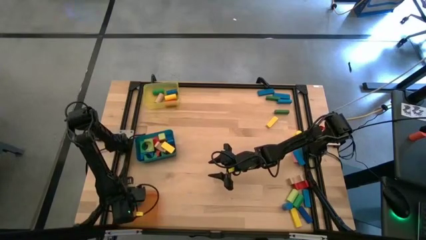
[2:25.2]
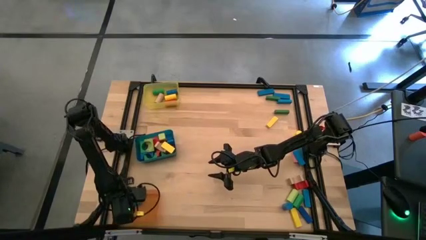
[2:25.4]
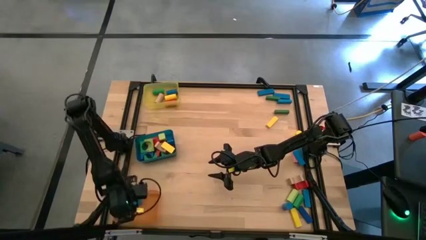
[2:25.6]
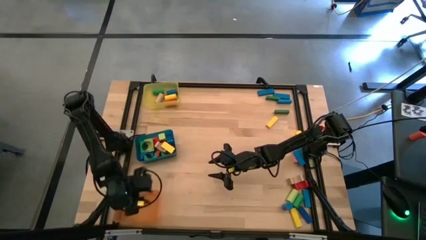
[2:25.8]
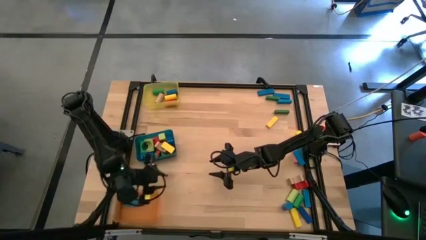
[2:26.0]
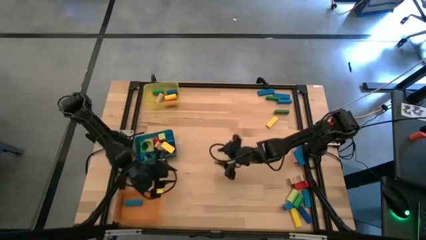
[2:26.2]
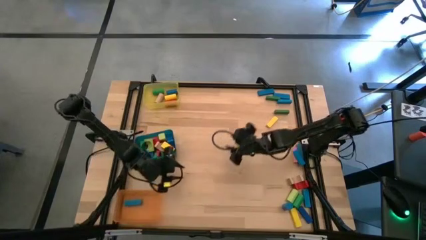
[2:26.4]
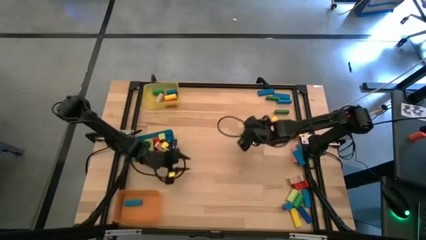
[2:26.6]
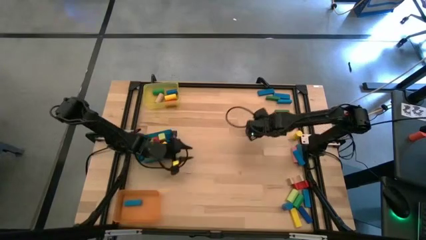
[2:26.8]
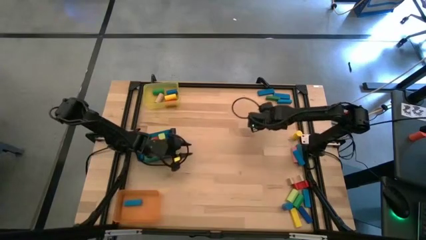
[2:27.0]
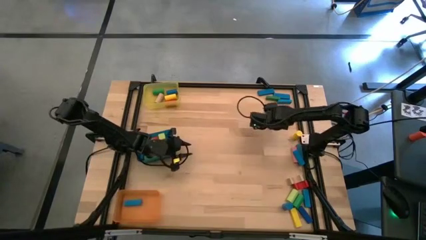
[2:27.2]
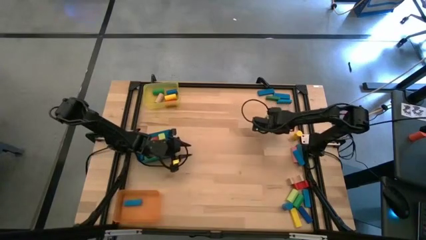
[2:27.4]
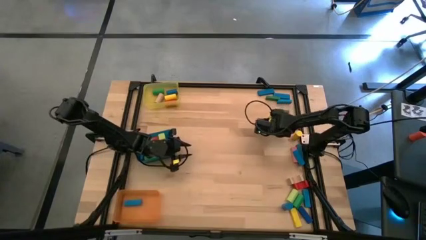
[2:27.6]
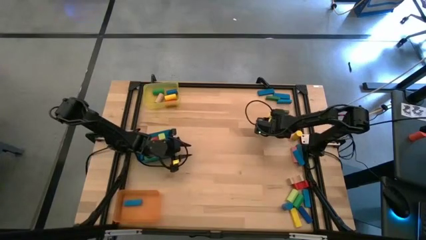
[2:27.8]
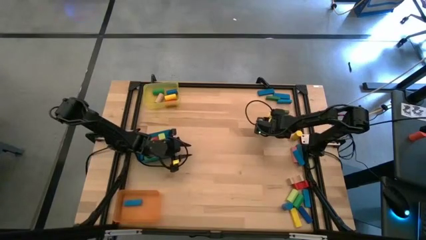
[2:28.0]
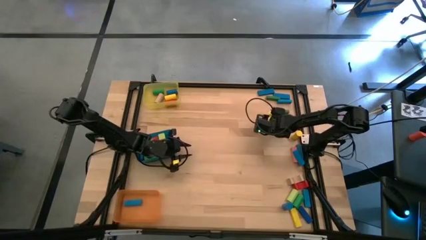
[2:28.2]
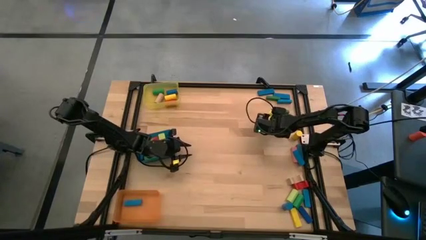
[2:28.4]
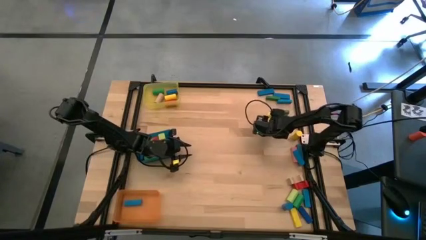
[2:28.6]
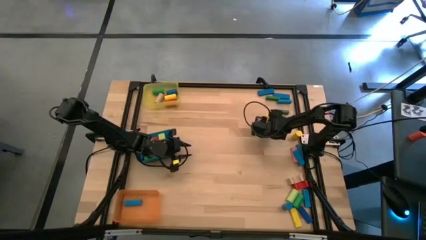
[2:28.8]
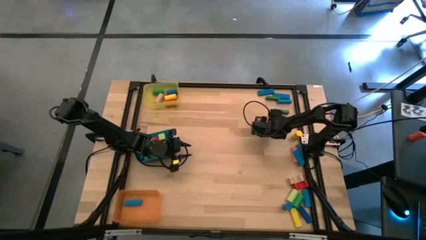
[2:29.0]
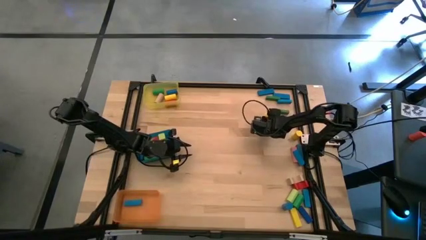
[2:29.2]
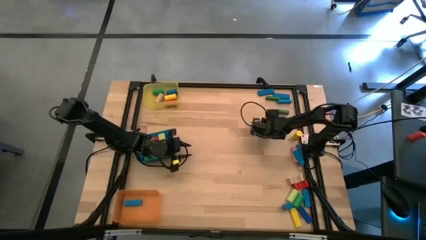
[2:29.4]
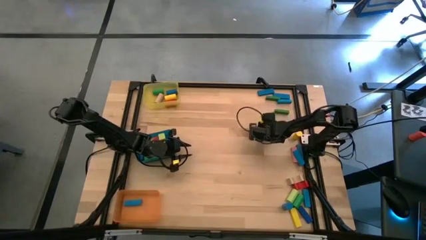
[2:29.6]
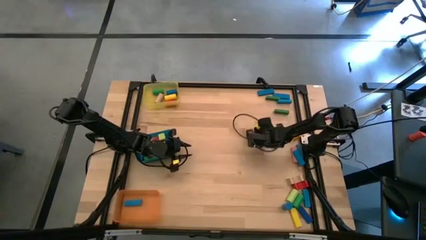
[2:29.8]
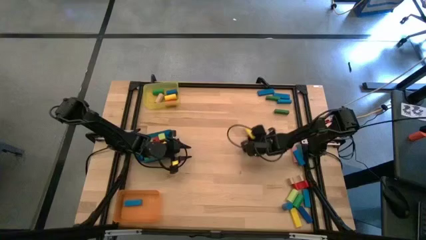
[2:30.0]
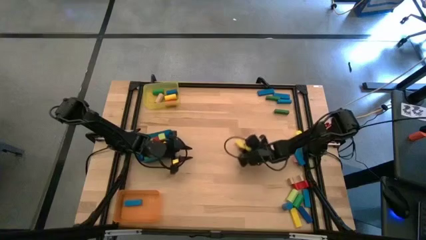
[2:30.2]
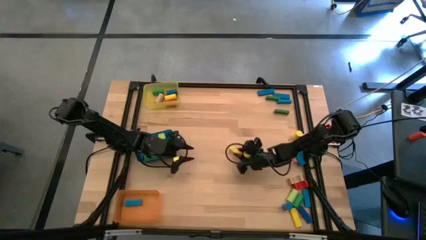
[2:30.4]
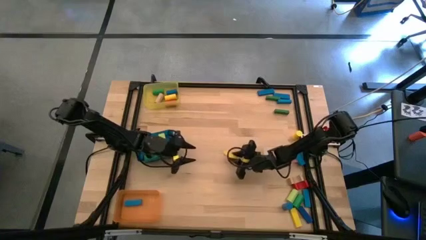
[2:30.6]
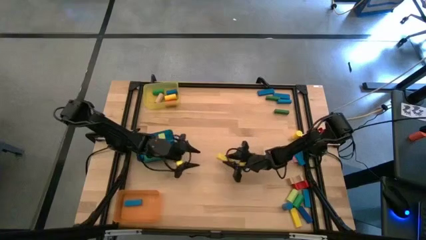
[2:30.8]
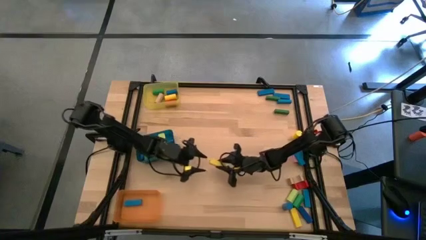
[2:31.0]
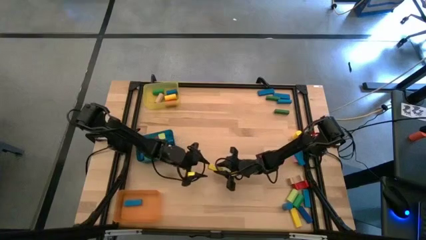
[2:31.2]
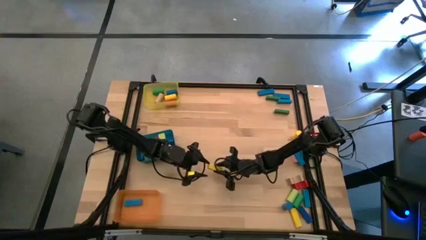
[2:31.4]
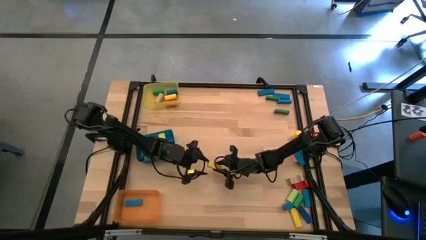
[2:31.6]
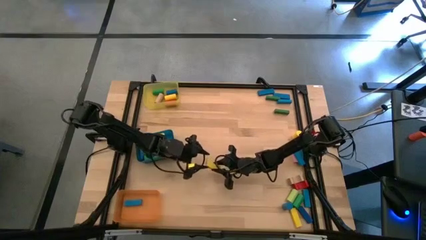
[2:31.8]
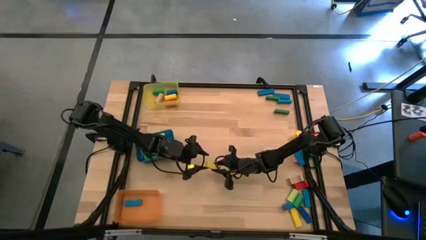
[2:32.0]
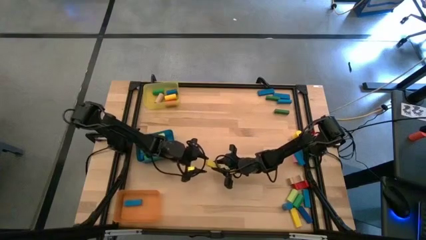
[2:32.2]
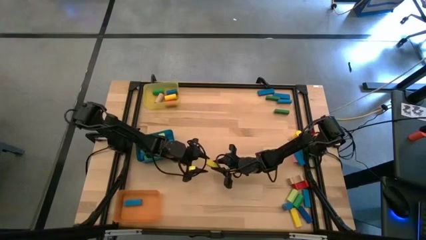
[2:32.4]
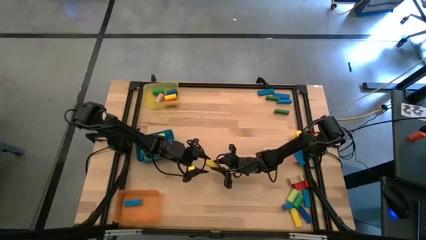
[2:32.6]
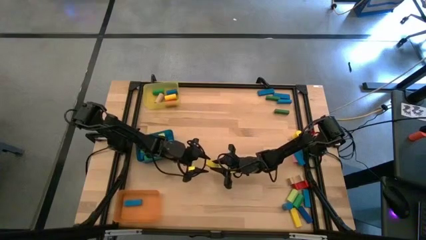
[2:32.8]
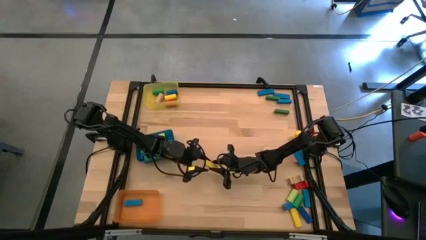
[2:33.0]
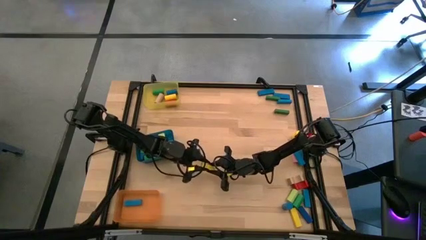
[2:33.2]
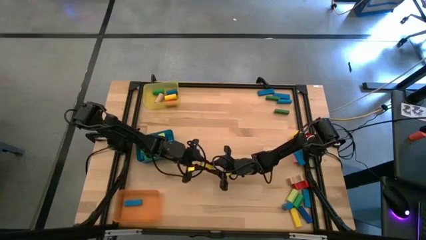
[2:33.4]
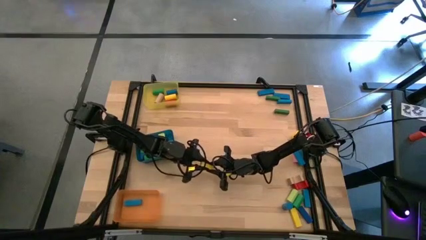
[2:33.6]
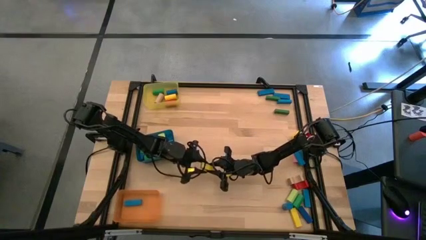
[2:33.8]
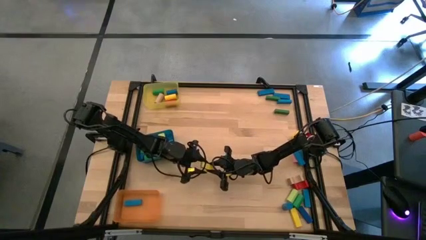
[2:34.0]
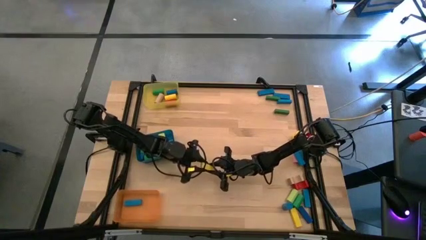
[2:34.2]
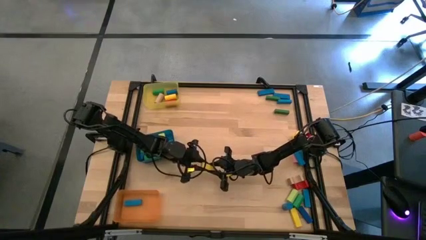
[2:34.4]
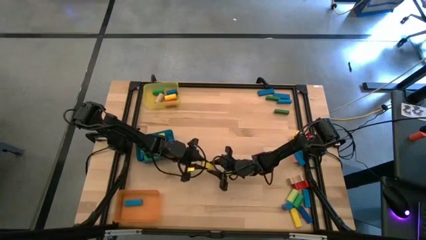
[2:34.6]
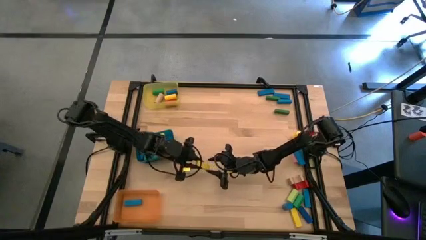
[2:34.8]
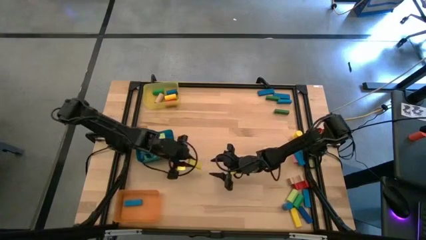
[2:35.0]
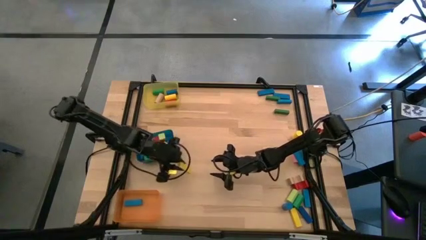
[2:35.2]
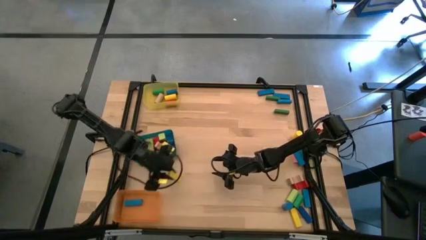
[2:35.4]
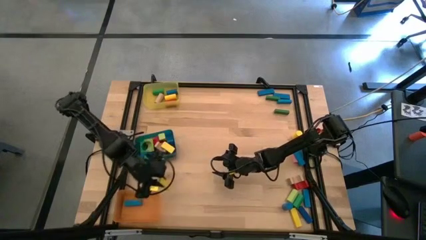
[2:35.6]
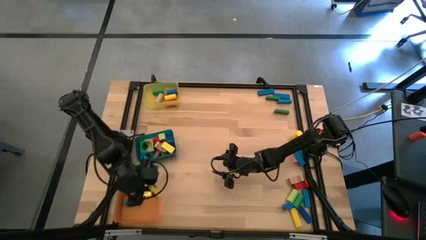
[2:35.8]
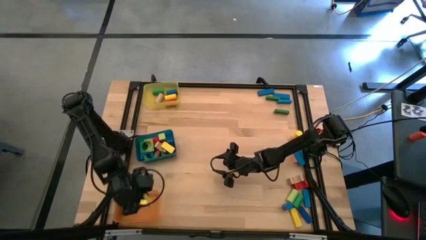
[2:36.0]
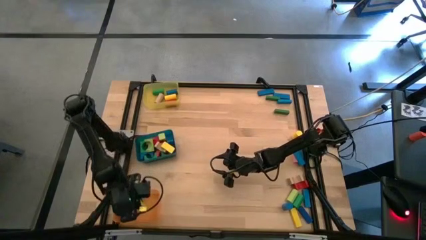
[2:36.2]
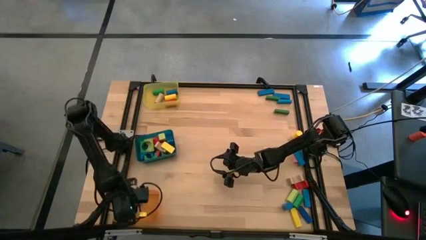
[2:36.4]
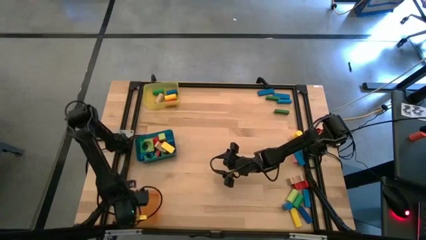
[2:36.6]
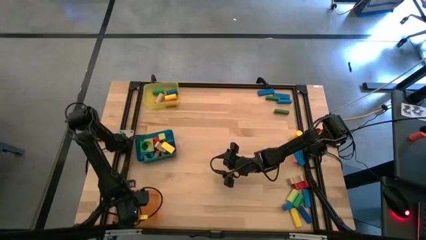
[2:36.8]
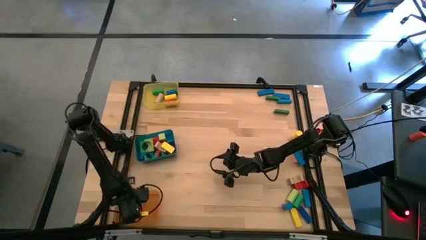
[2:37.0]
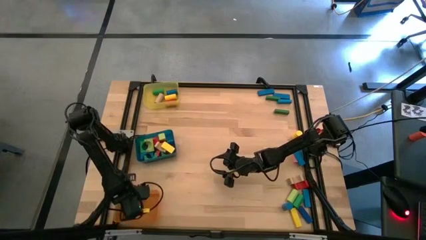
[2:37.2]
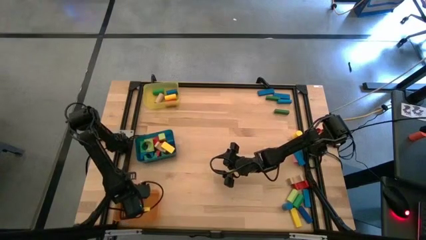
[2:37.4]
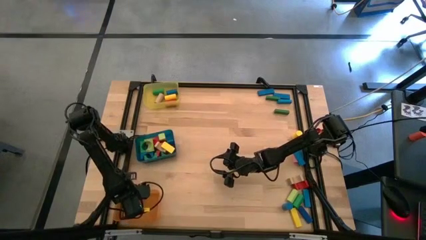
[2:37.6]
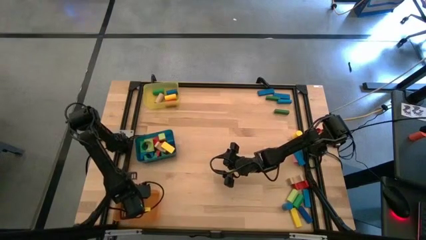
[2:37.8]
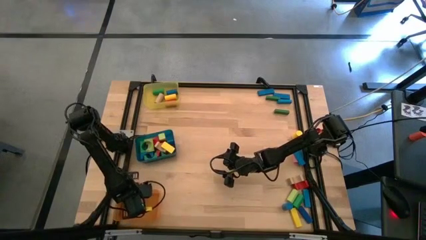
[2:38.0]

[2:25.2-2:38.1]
Task: Sort blocks by size
Put the yellow block into the orange bin

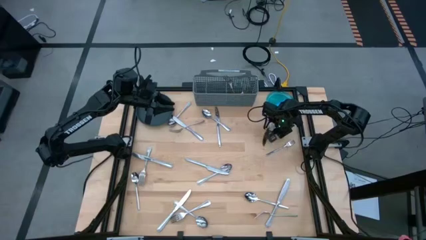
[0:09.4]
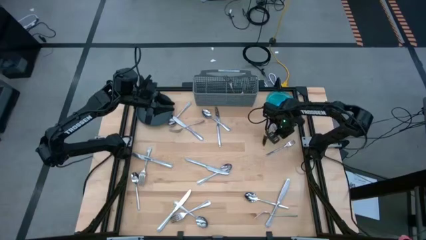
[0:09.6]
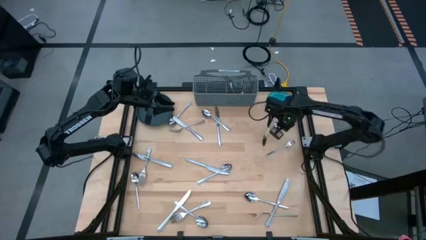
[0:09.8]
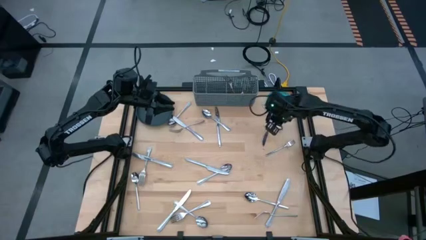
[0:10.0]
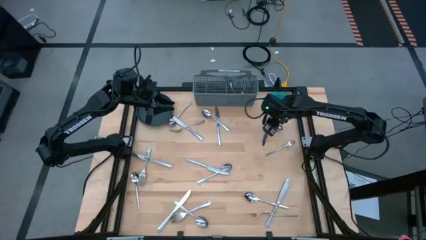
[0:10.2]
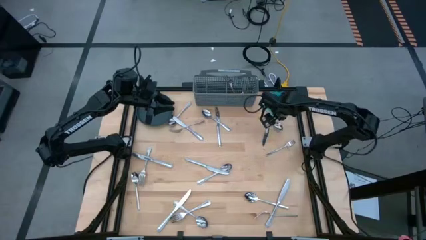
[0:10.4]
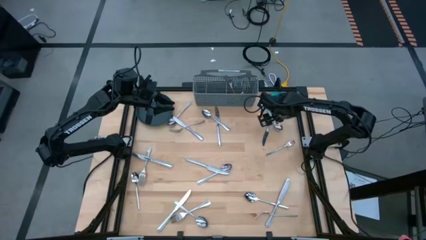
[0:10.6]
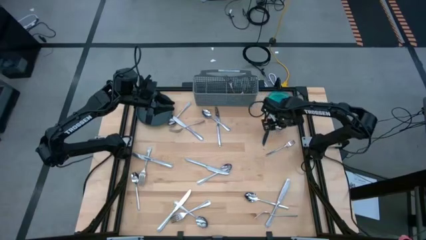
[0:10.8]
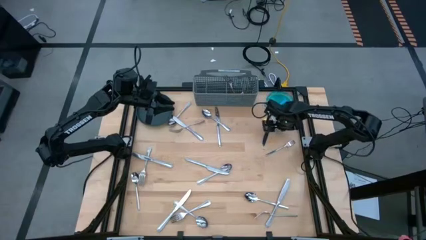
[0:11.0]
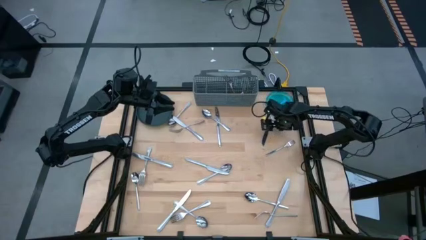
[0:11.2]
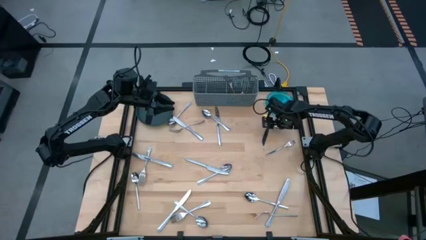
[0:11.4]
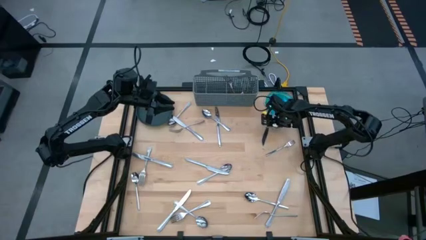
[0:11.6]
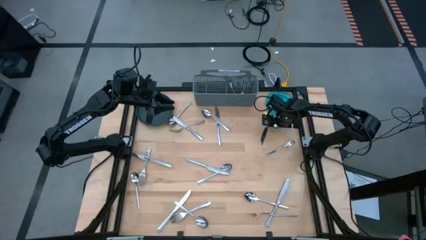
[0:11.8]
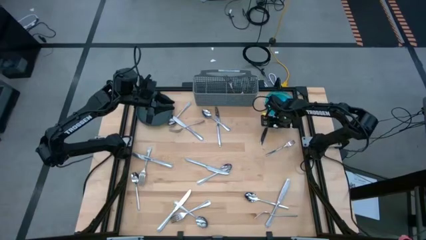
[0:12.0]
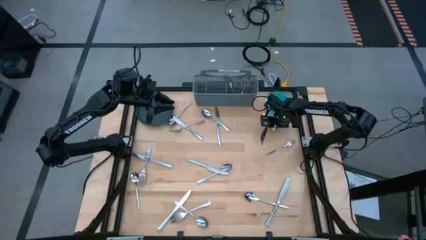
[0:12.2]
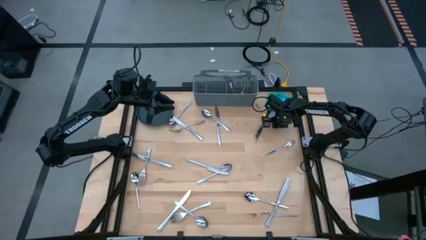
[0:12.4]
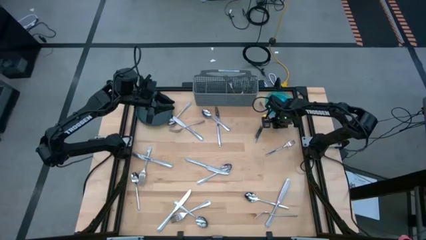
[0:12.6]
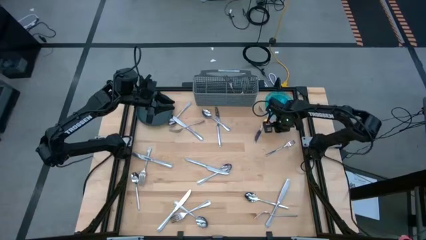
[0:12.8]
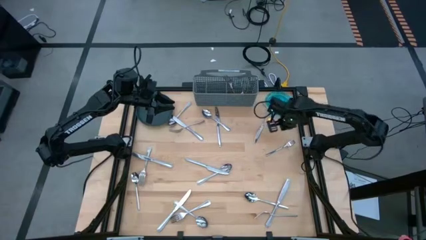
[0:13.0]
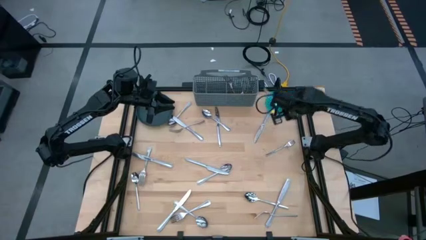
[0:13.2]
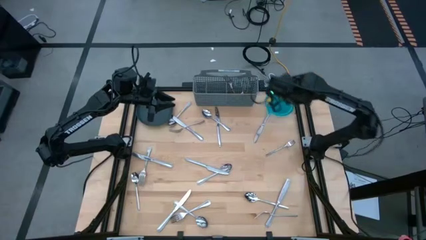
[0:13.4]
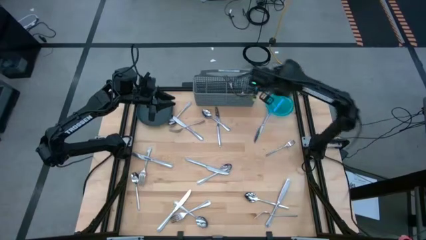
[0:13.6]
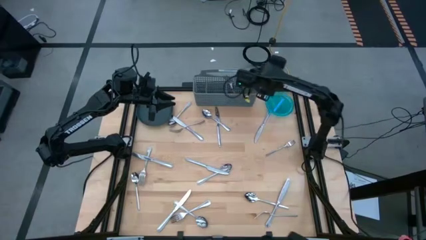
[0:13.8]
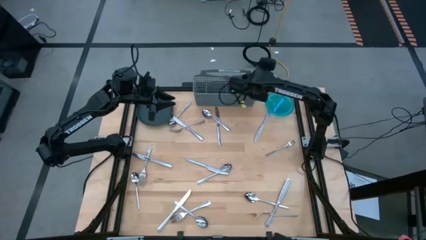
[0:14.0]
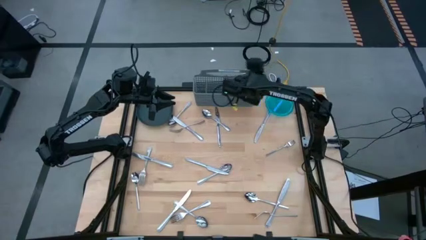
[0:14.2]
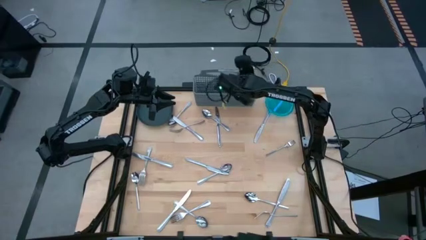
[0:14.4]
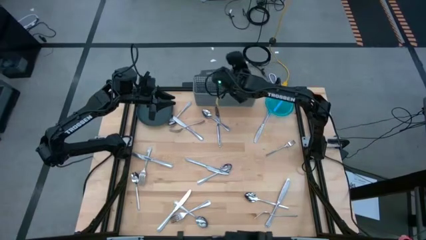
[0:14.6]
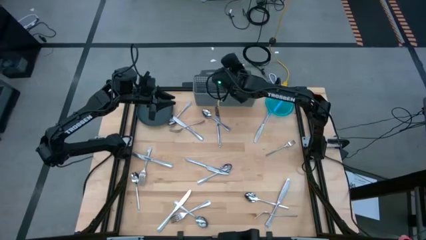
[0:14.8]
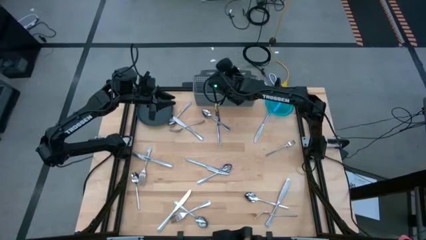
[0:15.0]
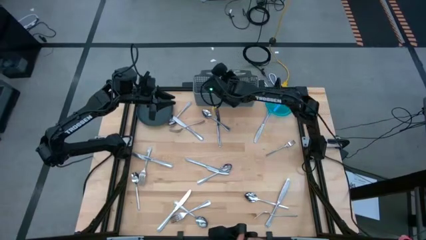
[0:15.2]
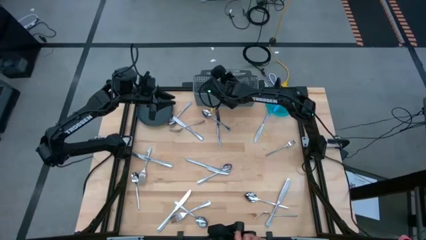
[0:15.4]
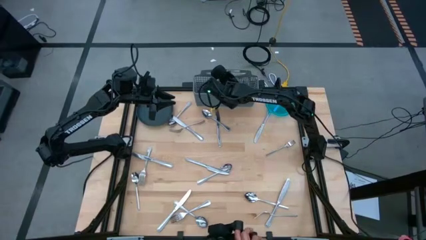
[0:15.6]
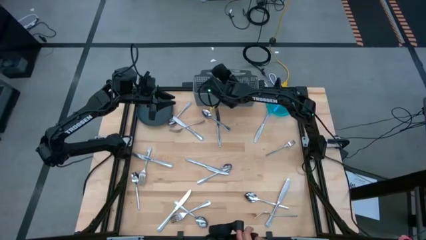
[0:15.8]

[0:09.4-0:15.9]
Task: Sort silverware
Put the spoon into the silverware basket
